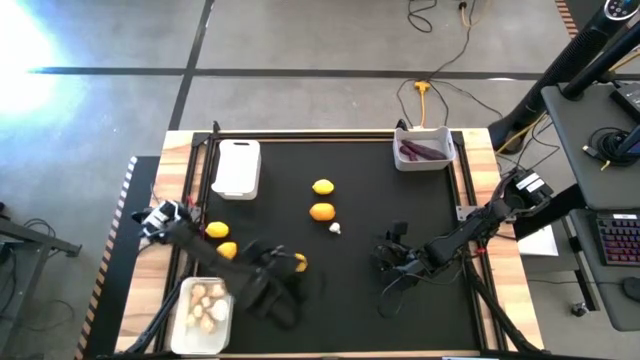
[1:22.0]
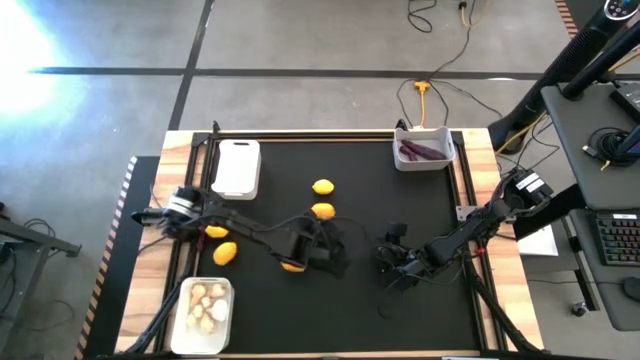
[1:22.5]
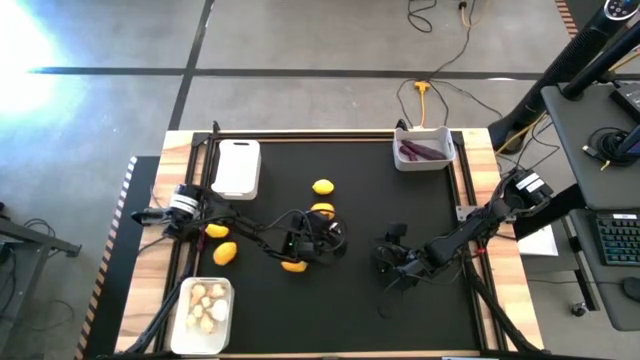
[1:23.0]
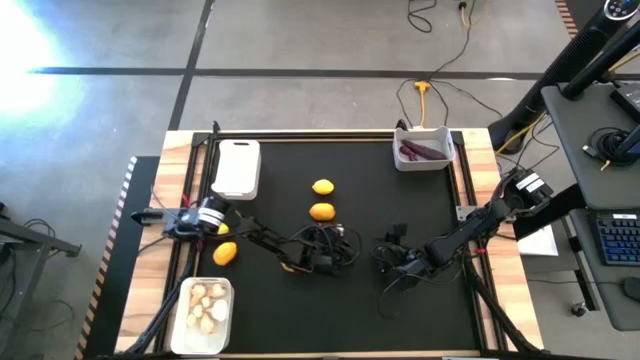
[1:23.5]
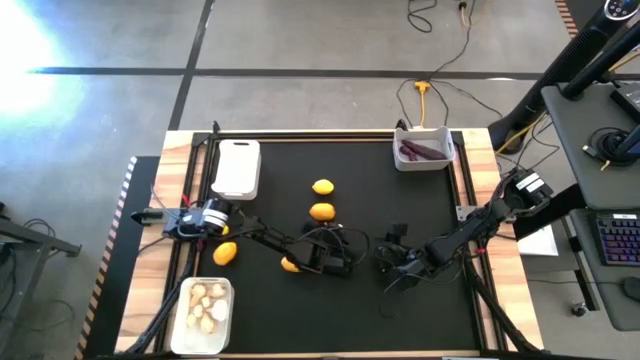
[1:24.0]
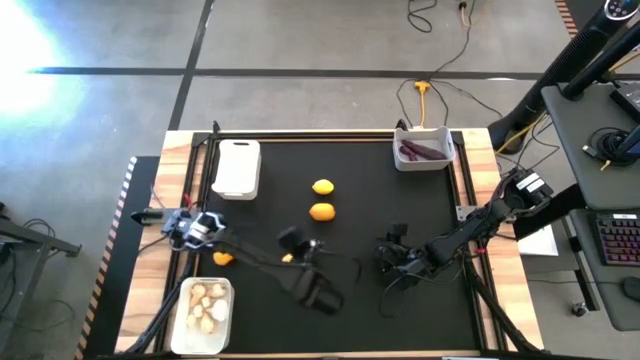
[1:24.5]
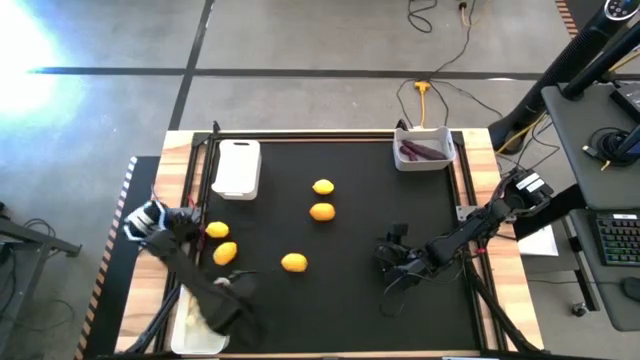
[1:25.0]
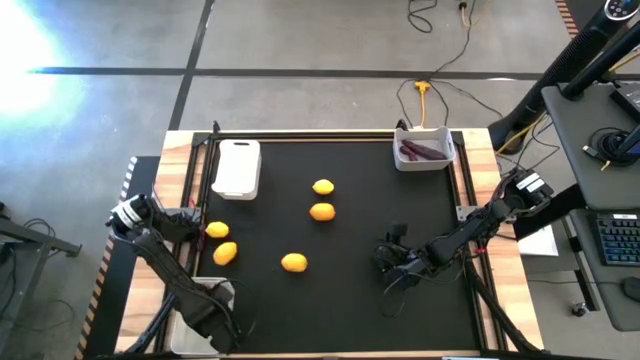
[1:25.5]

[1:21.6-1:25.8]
Task: Sort produce into baskets
Put the small garlic into the bottom white bin

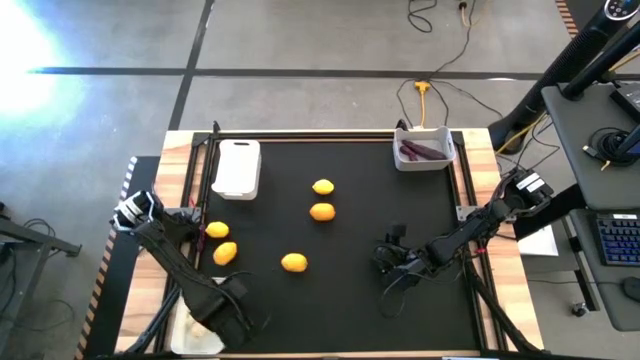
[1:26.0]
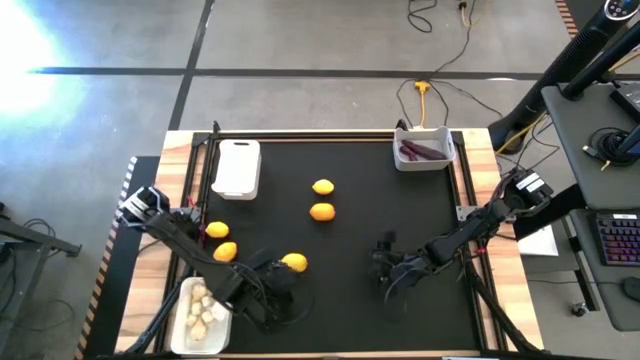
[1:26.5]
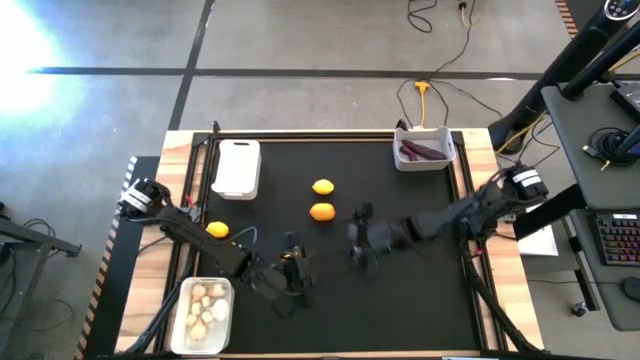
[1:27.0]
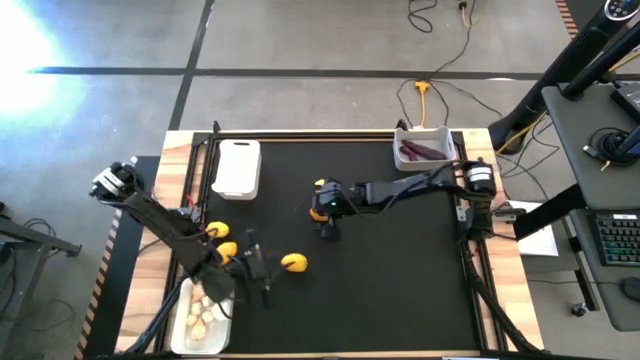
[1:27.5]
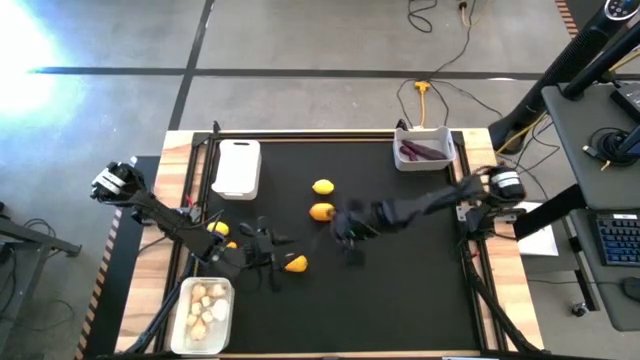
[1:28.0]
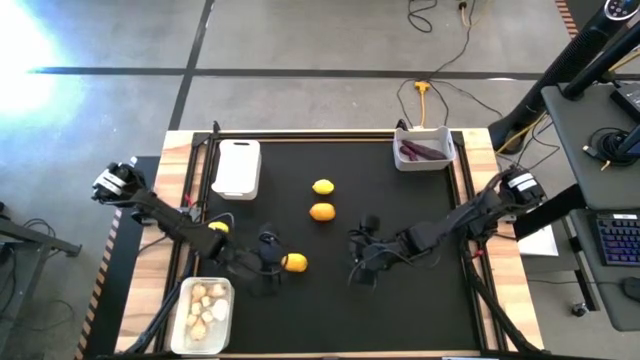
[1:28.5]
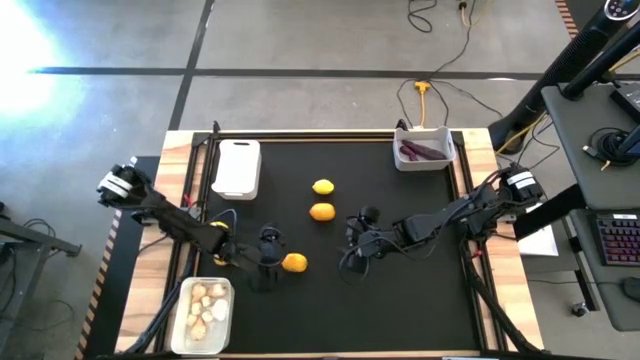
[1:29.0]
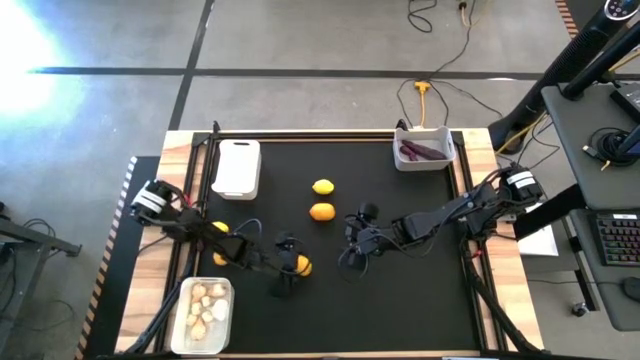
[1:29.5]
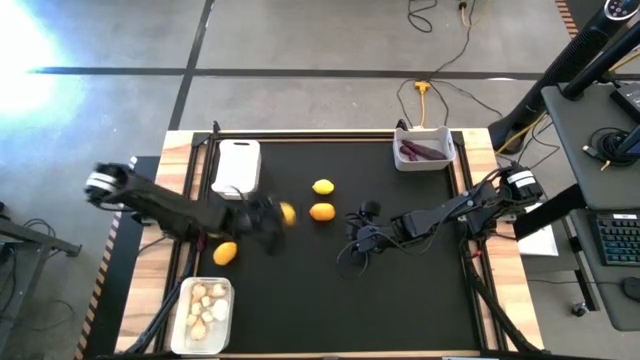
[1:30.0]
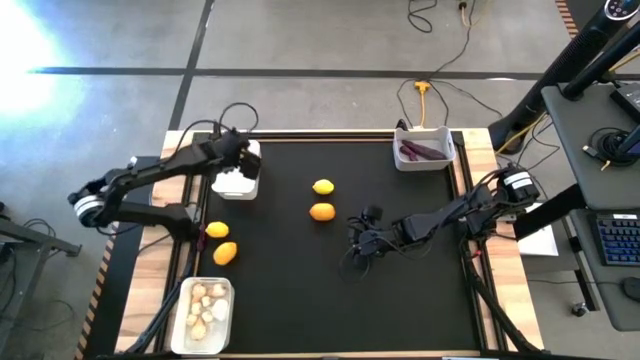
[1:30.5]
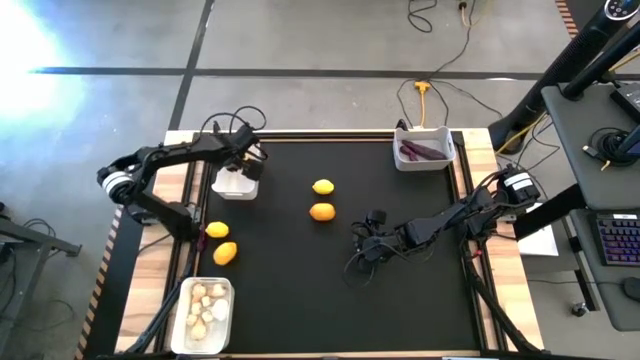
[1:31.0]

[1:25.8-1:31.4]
Put the lemon into the top white bin

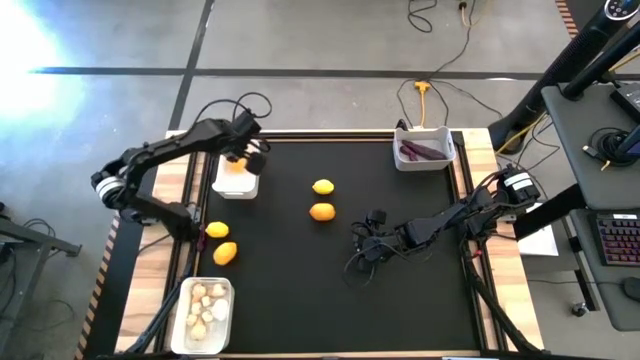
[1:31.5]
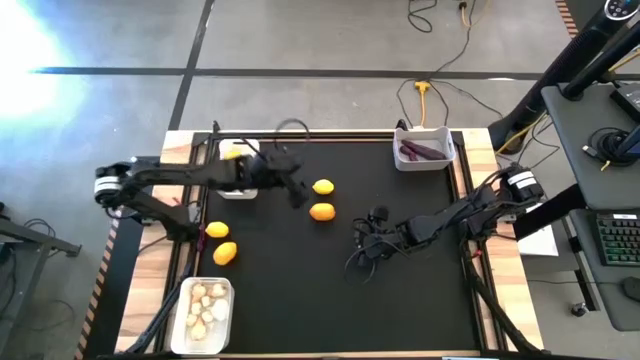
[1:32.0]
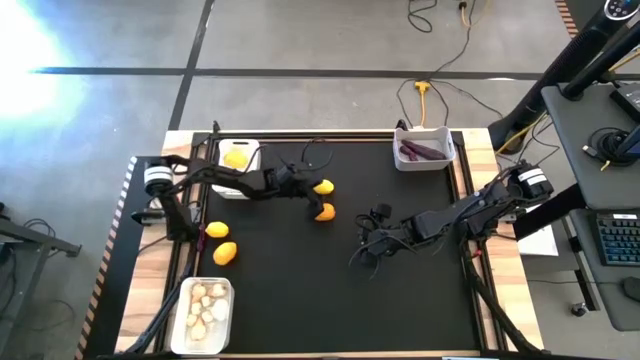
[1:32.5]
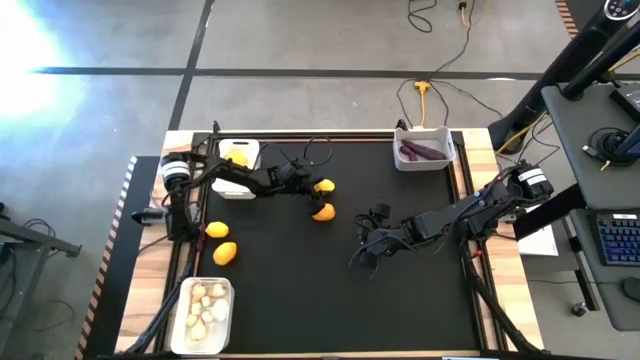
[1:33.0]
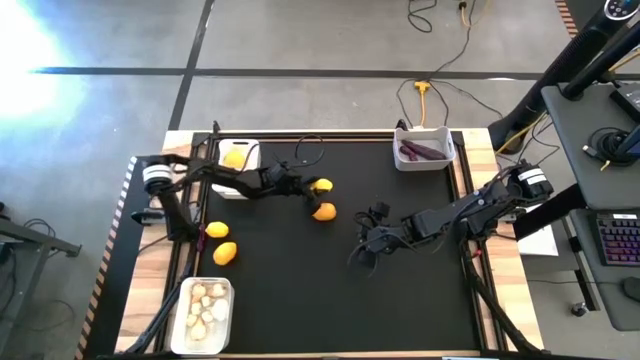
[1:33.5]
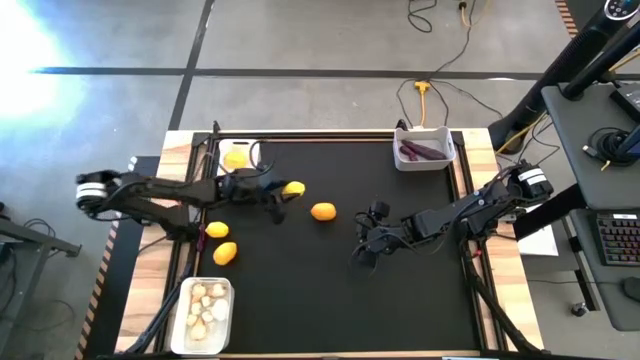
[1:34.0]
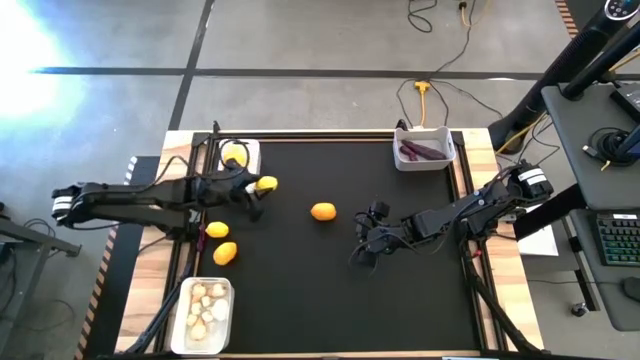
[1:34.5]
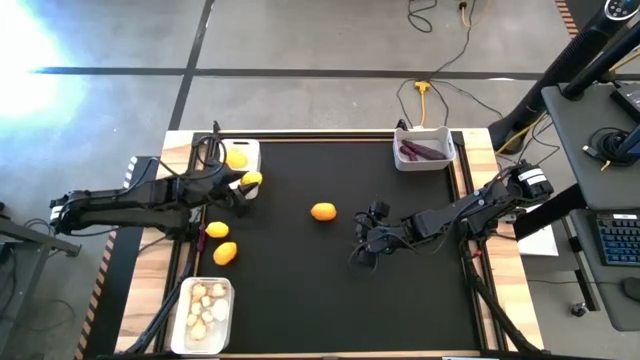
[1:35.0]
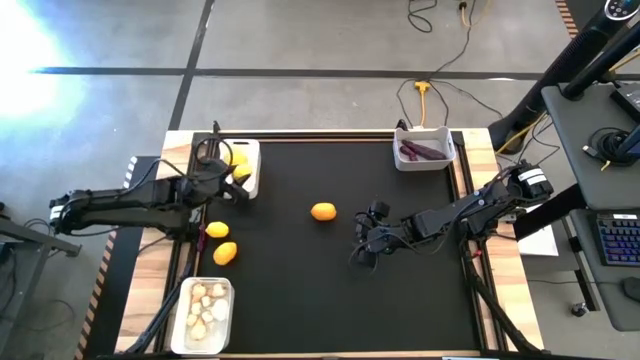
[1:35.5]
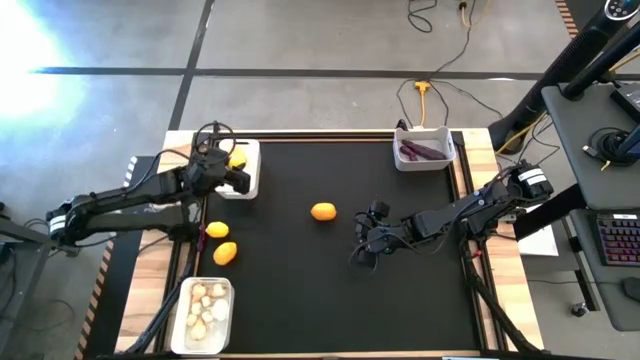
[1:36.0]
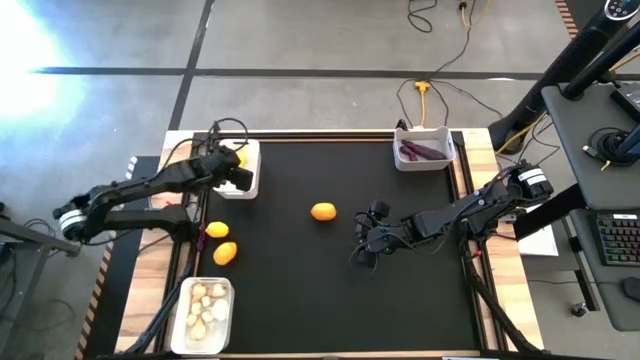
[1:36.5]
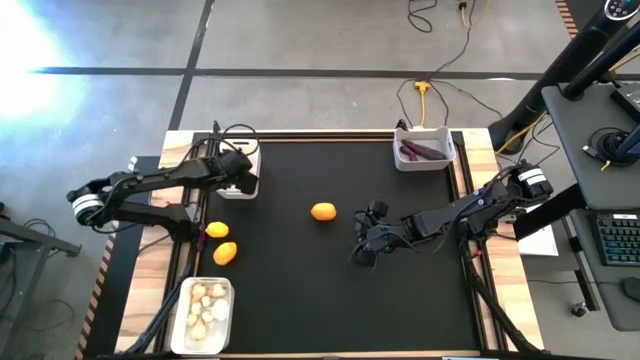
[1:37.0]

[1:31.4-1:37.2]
Put the lemon into the top white bin

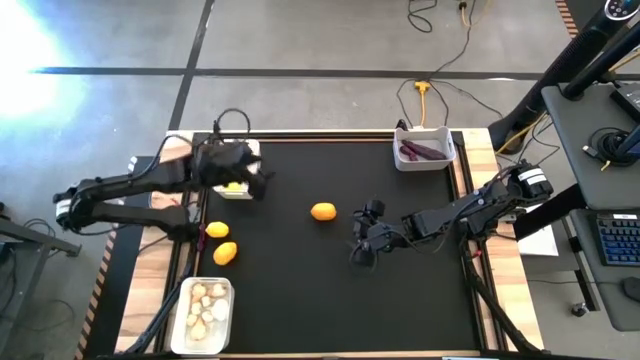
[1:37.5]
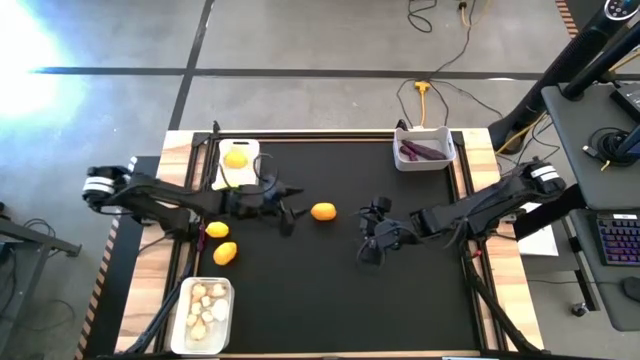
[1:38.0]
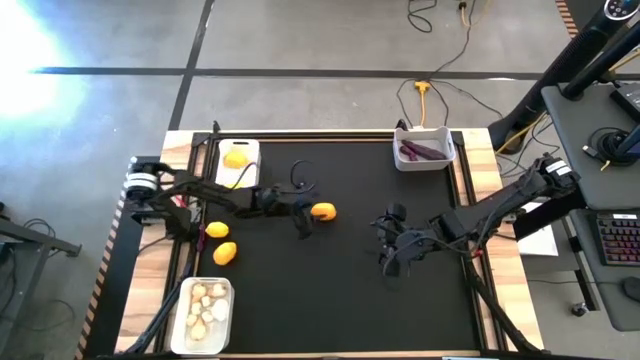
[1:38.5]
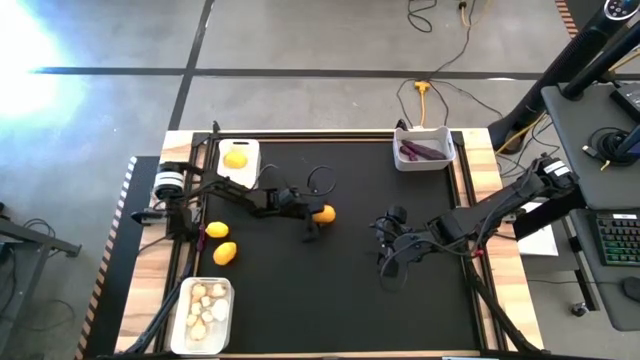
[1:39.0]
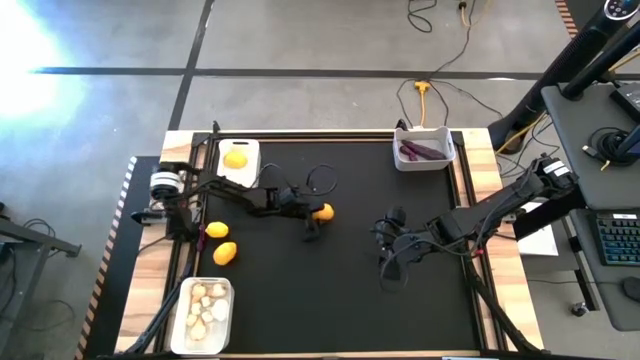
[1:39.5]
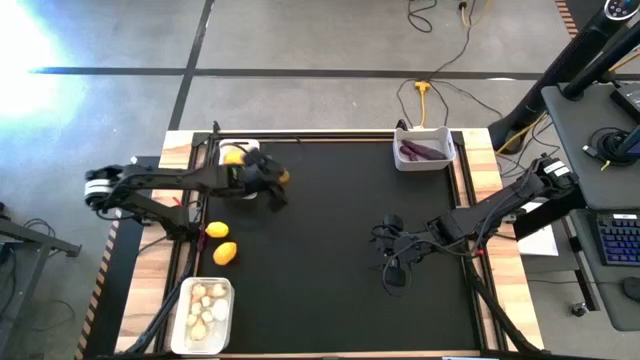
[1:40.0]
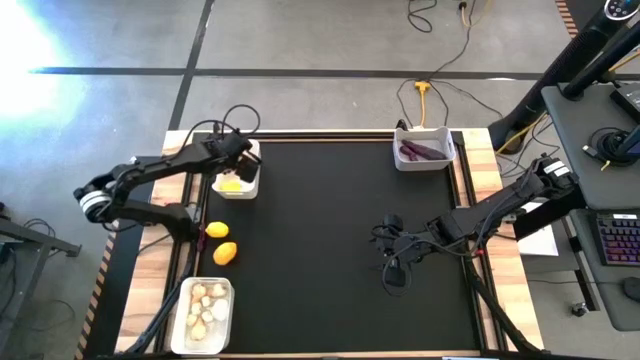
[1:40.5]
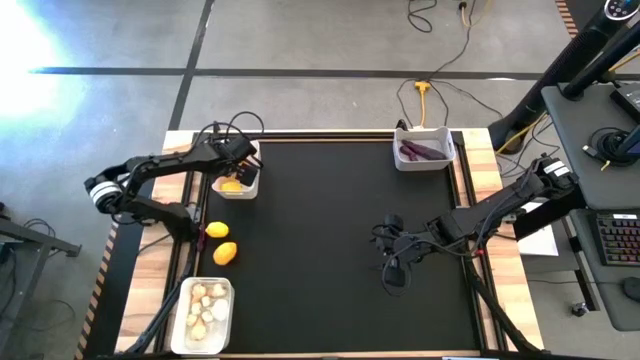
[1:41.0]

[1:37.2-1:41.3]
Put the lemon into the top white bin

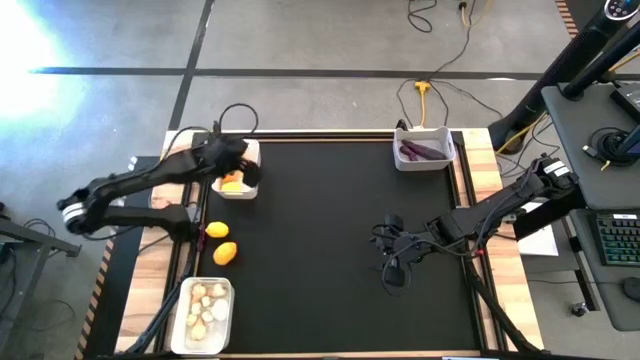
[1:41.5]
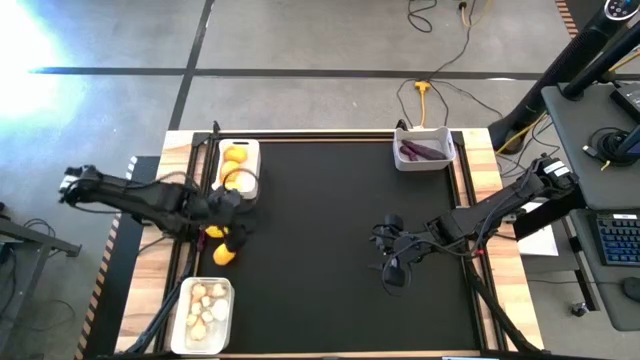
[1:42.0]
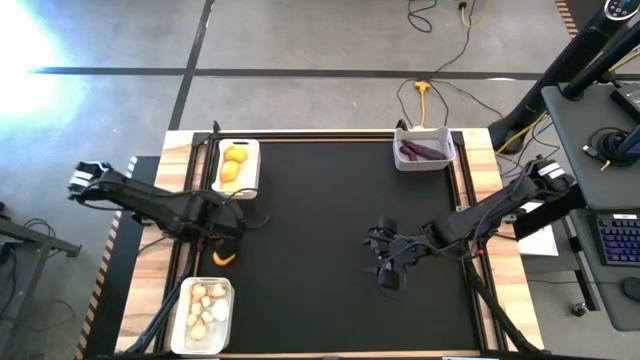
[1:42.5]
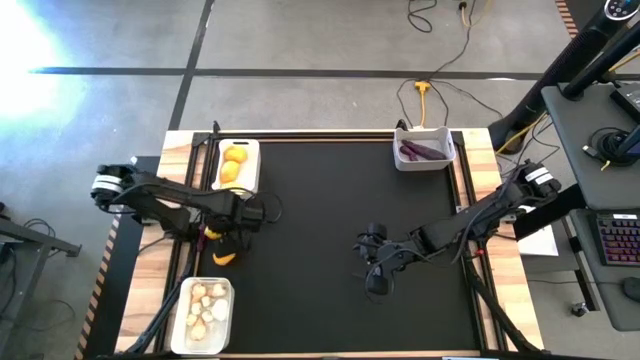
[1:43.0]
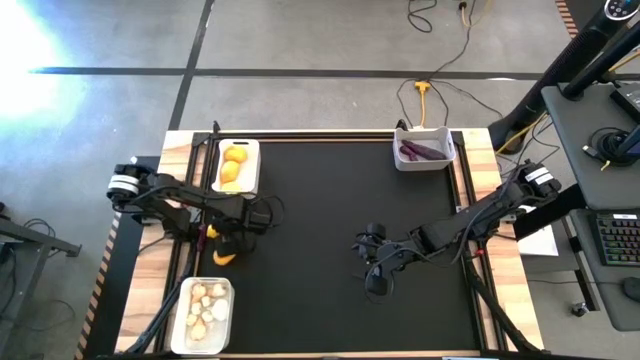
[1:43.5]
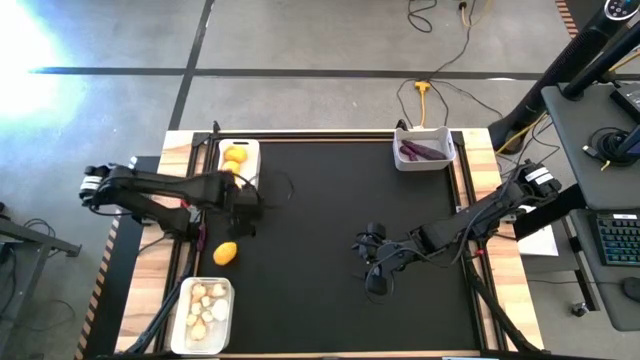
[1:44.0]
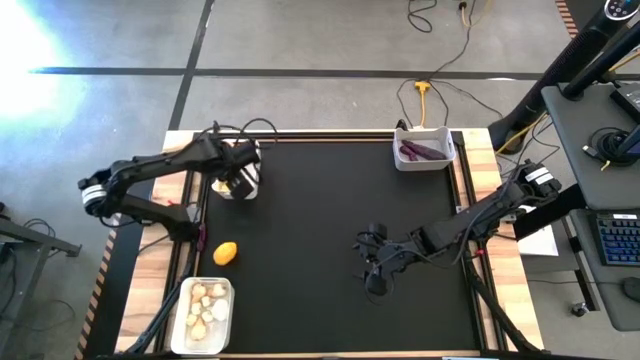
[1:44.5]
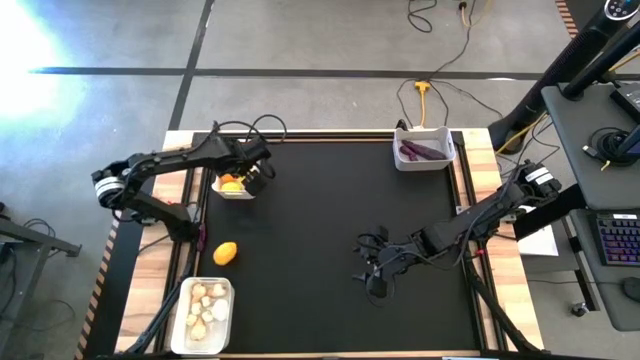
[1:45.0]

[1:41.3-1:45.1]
Put the lemon into the top white bin
